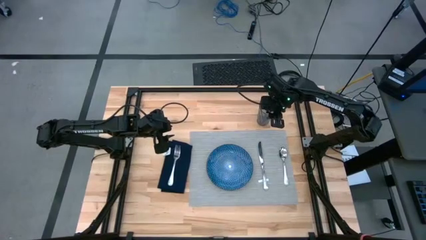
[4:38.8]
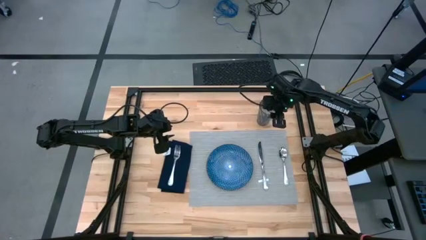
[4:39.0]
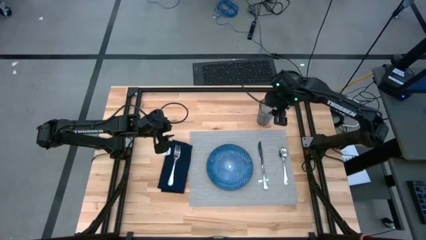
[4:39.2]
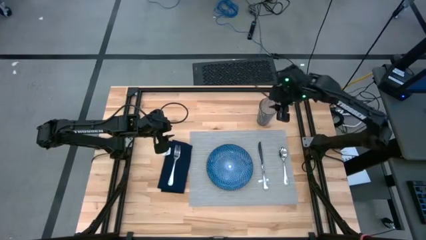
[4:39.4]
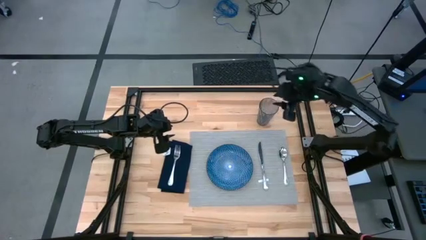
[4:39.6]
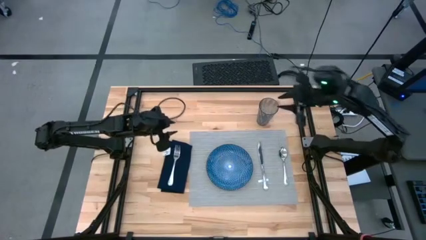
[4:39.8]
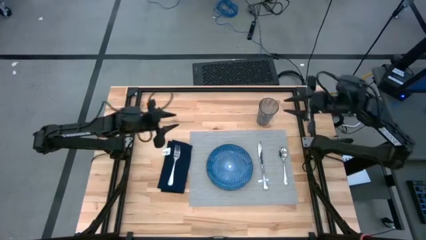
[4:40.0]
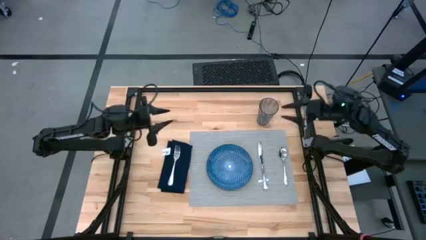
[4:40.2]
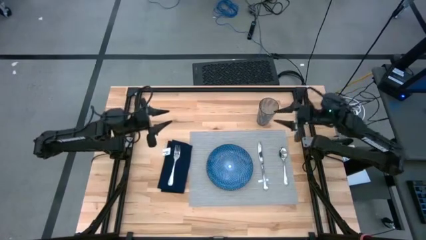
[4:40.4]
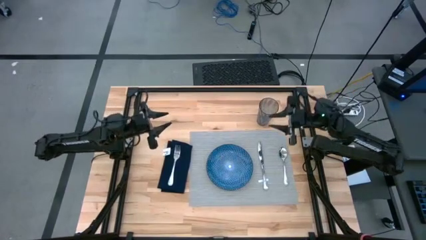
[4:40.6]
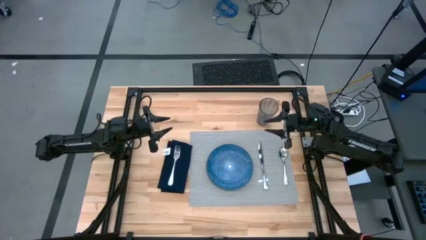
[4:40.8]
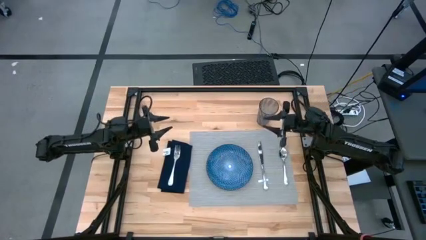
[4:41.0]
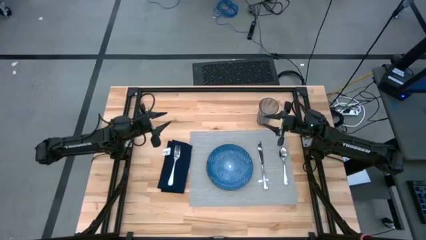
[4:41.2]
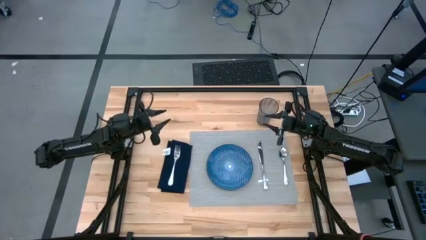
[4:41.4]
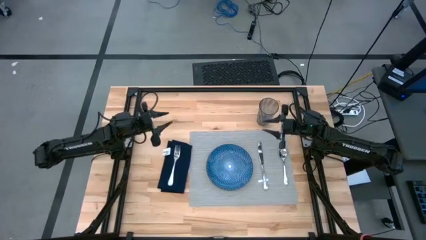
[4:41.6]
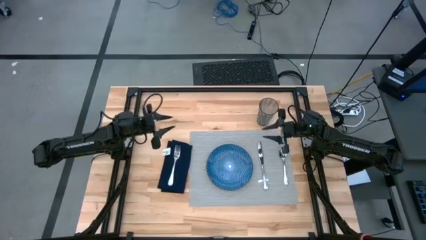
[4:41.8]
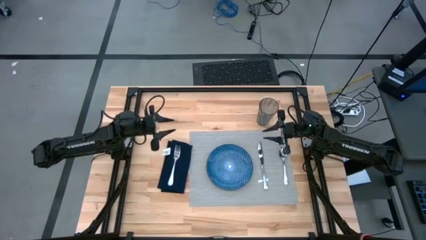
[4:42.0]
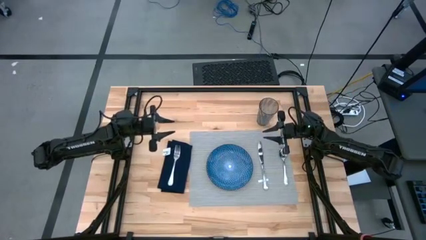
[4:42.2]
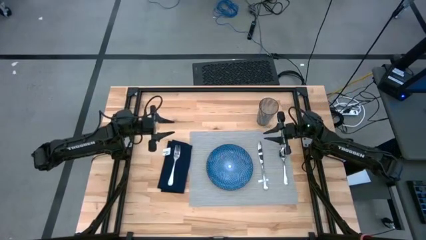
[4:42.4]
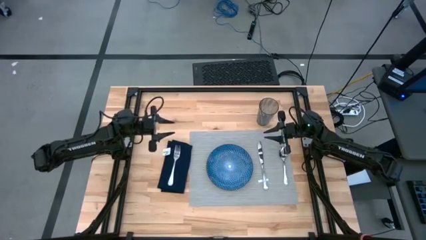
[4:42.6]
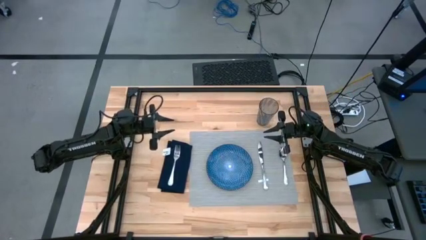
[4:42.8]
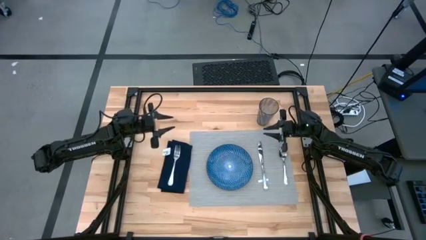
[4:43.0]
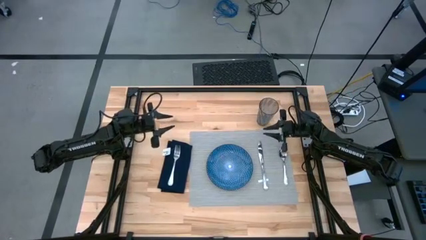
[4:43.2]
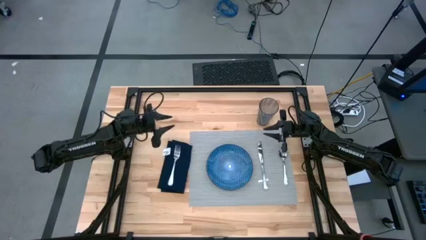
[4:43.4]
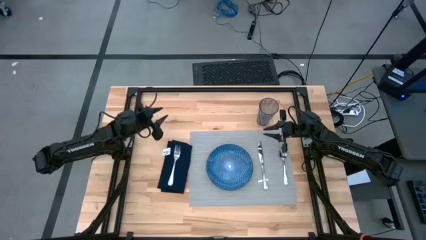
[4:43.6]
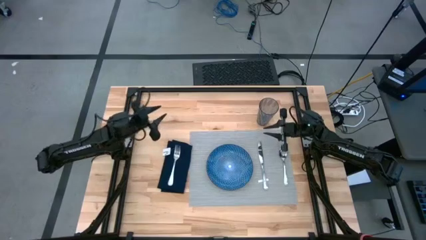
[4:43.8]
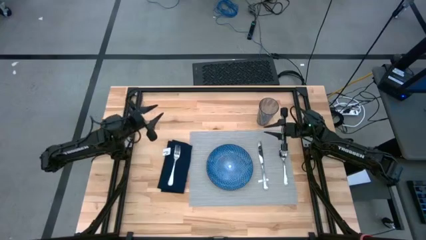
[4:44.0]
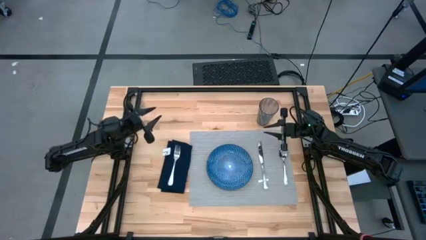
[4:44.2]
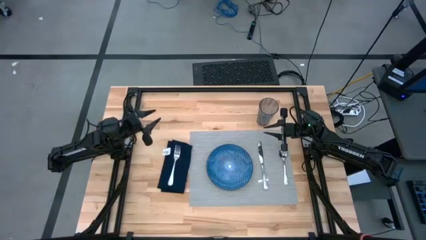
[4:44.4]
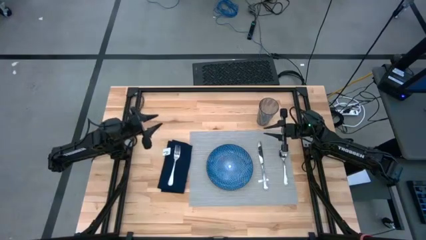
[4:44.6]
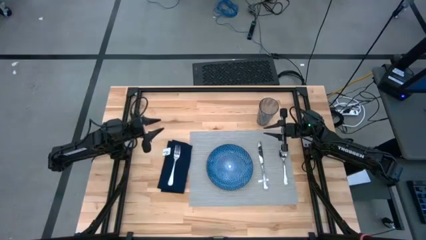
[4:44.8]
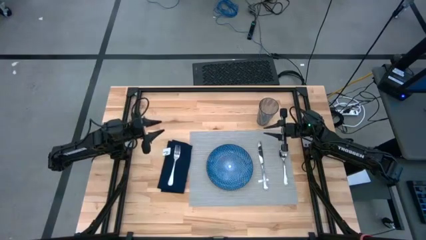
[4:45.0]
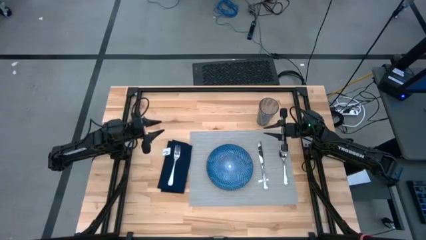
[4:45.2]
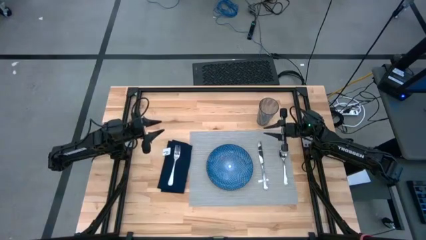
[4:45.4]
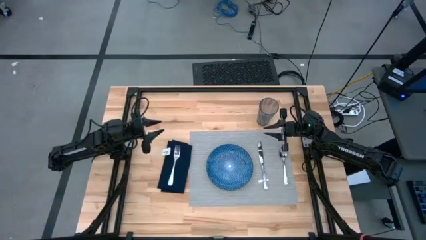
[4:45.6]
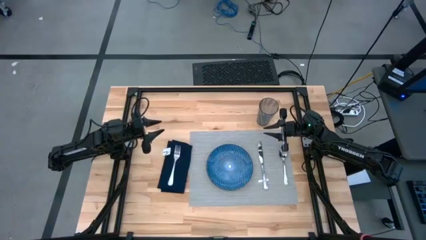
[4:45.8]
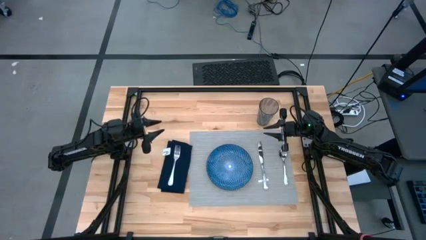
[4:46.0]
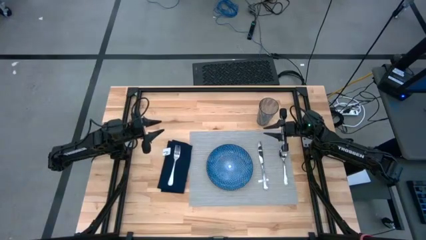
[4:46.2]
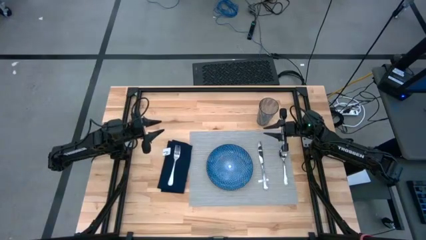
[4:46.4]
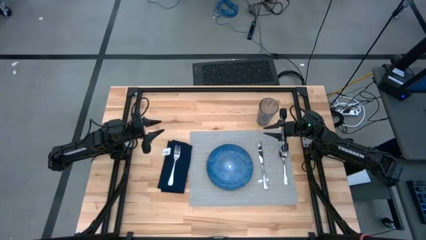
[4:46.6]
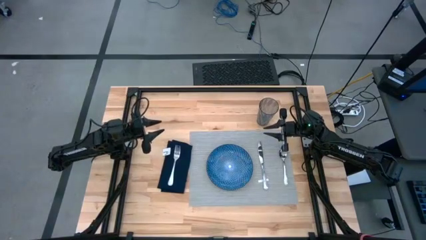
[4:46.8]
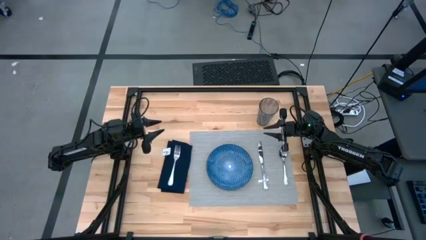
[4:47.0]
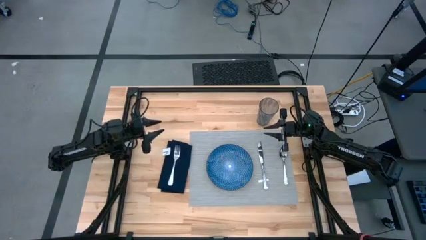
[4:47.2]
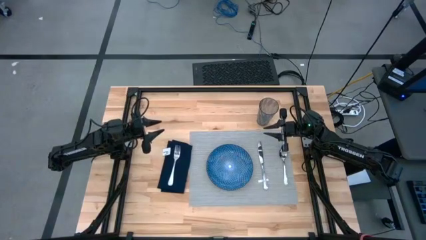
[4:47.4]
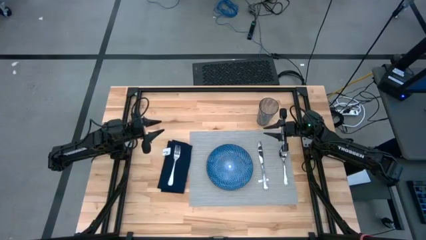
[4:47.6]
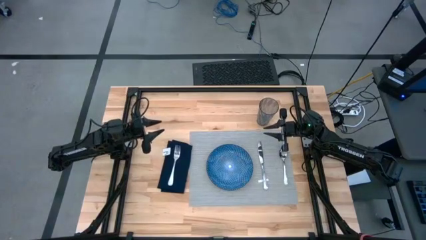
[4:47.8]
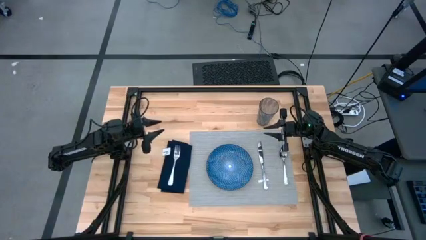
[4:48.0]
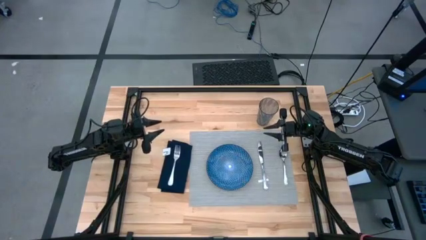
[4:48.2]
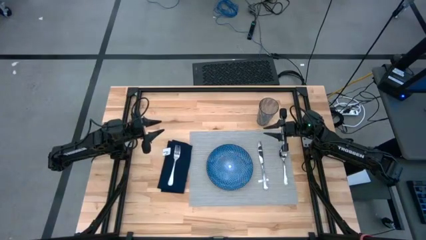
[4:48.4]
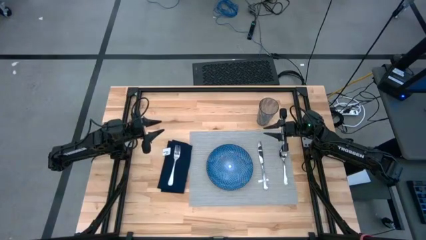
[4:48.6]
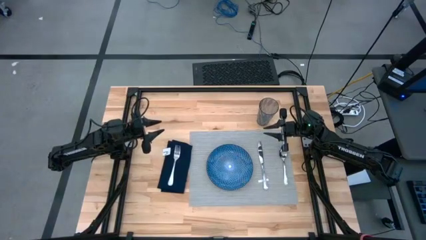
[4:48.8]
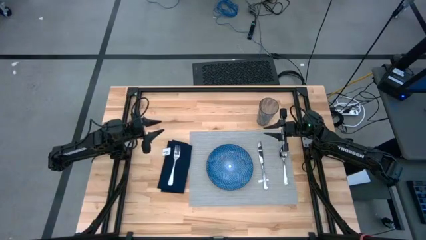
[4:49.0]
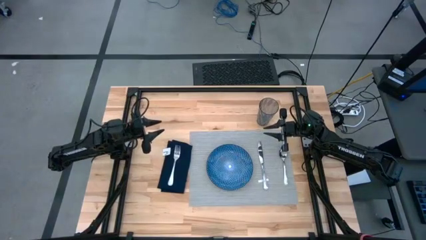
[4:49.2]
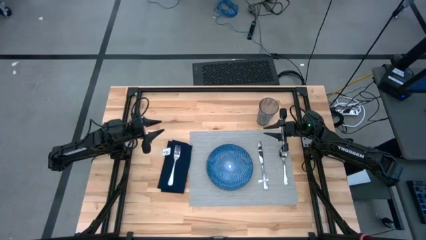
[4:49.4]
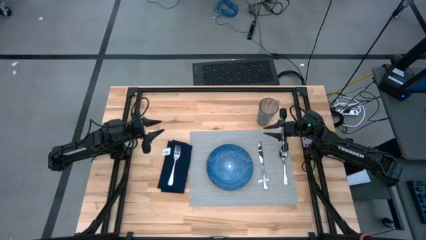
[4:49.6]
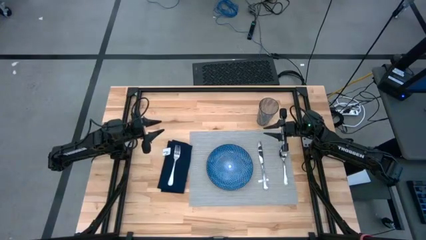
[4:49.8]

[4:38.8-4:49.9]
Task: Set table place
Return to Home position

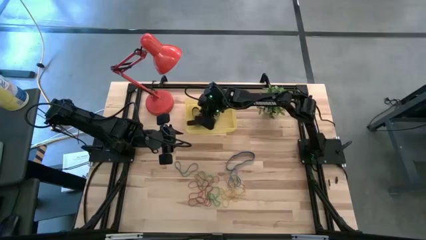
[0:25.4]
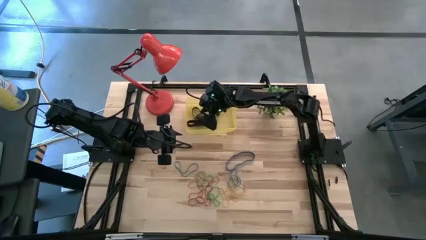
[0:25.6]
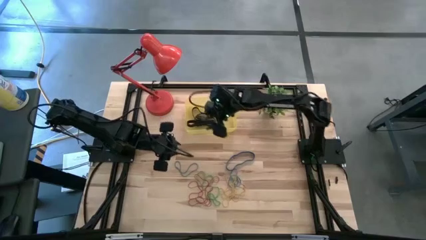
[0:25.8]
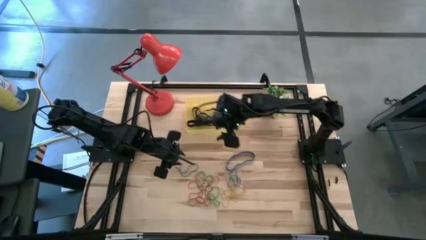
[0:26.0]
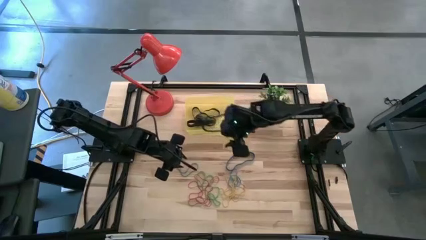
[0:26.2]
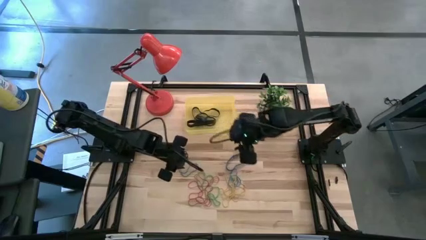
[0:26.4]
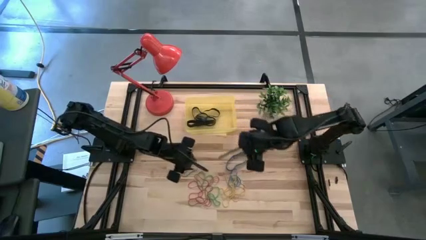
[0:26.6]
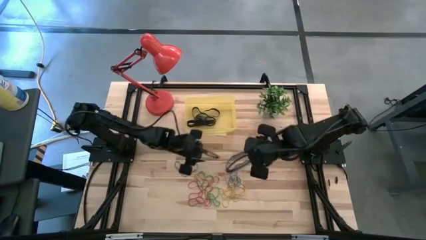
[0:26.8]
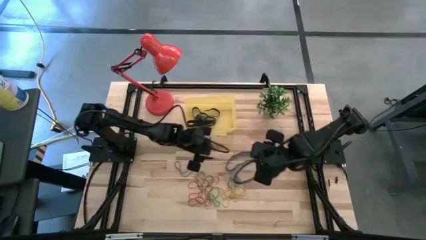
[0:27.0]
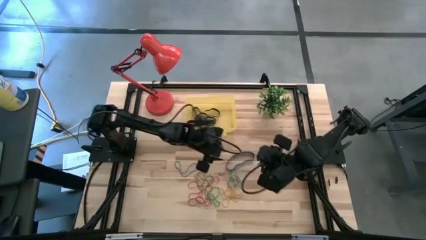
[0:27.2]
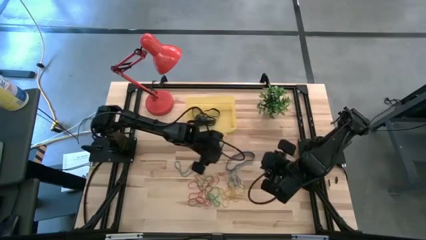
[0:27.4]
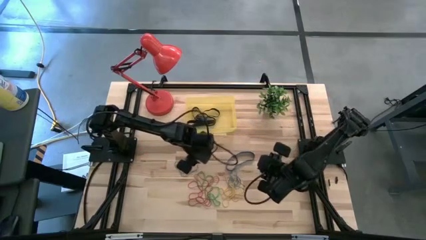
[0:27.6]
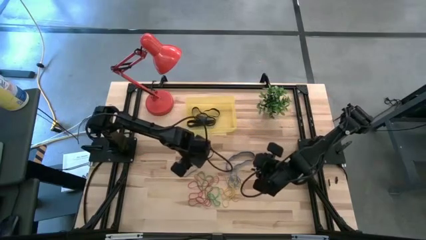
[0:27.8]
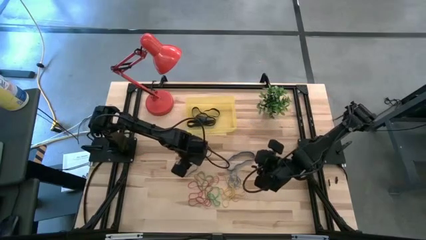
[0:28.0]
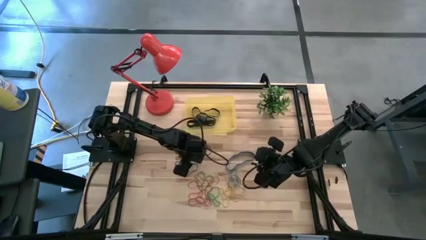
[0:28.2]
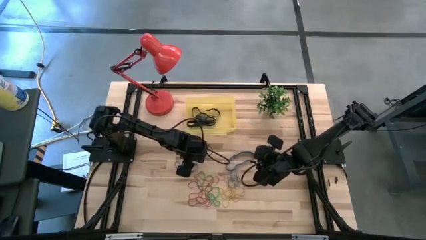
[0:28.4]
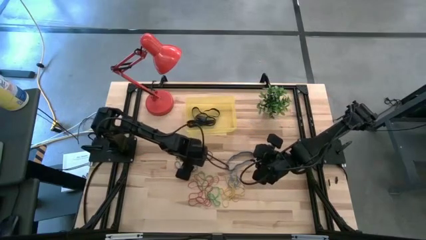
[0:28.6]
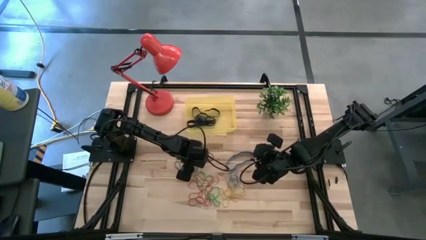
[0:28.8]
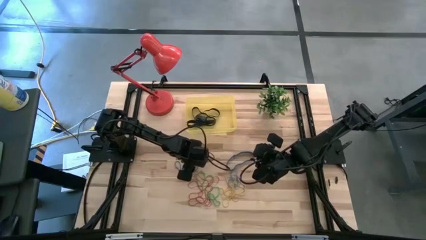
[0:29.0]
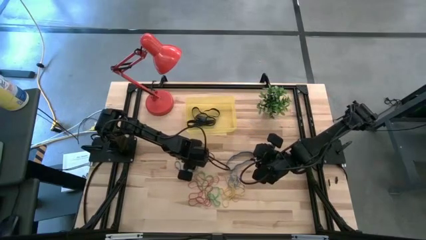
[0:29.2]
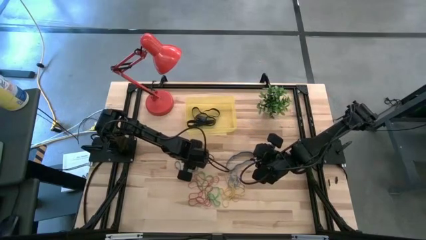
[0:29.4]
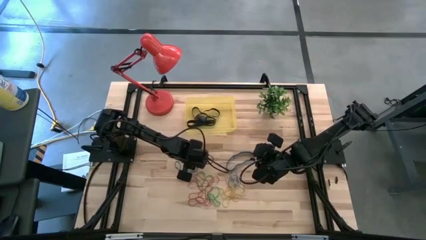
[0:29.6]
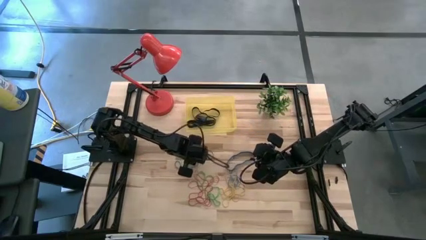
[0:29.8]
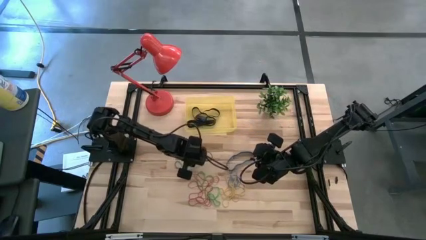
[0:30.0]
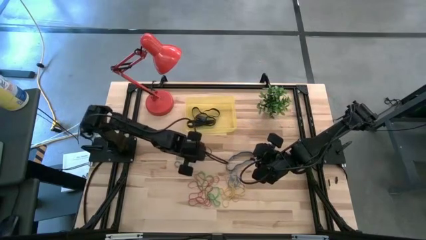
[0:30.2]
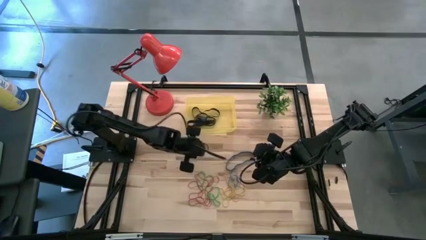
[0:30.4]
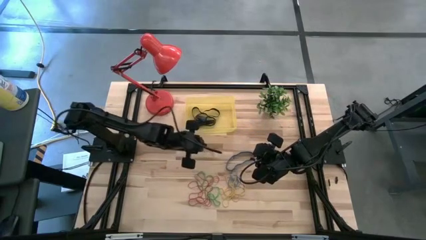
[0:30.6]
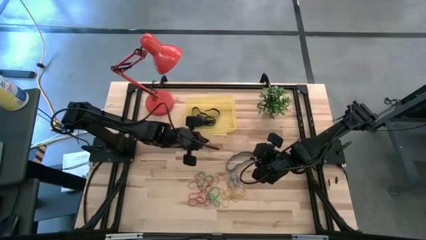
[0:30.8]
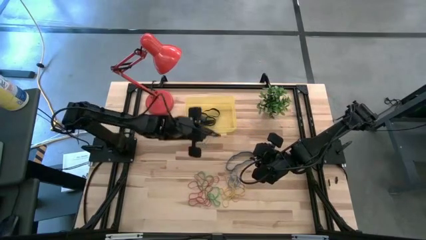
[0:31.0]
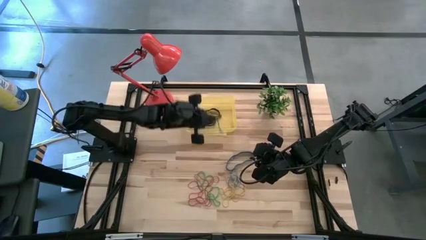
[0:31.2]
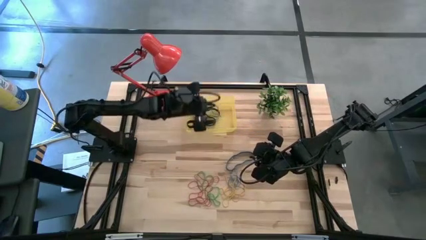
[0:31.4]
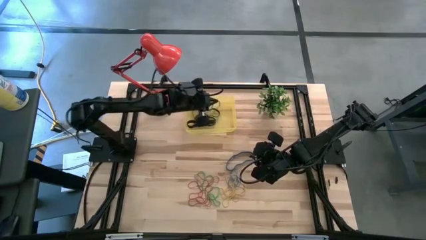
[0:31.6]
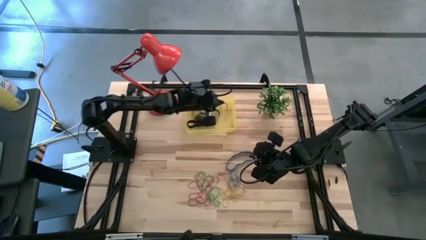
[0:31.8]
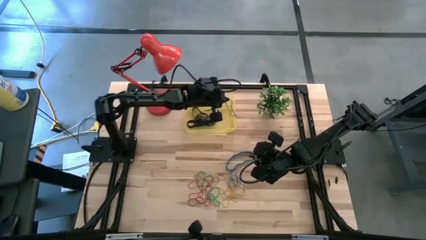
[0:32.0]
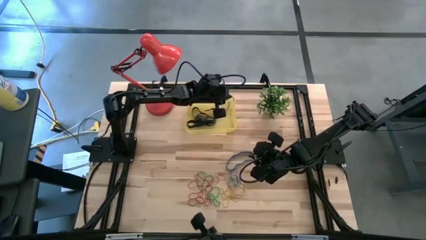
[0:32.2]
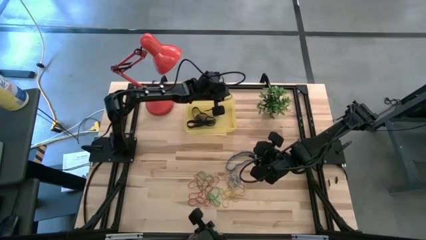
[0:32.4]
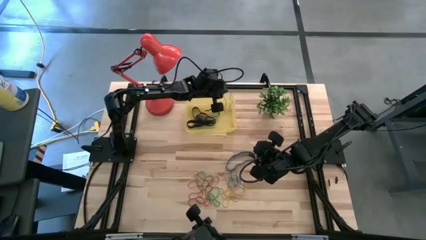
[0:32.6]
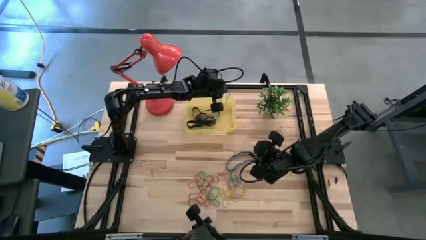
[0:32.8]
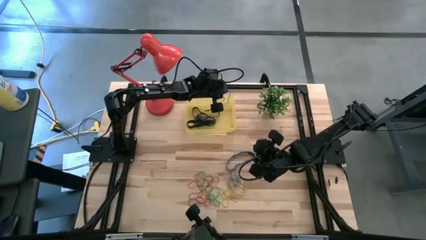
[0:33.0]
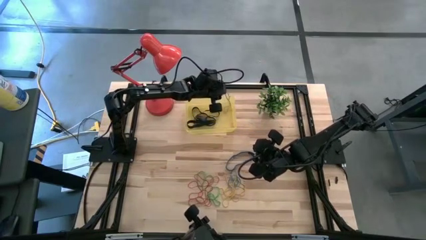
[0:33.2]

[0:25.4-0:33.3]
Task: Pick and place rubber bands into bin
Put the blue rubber band into the yellow container
